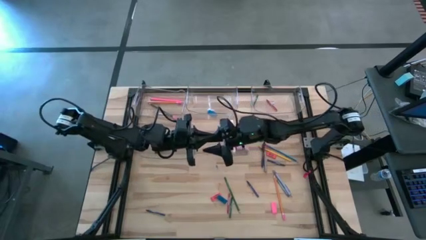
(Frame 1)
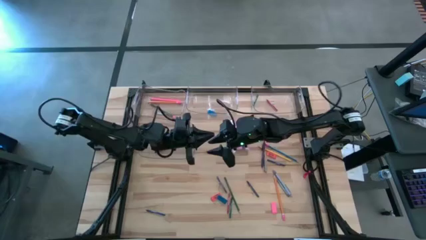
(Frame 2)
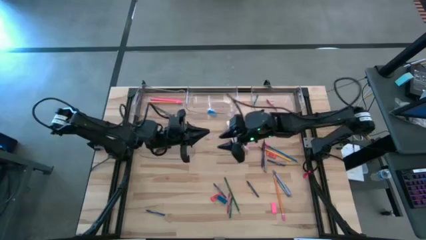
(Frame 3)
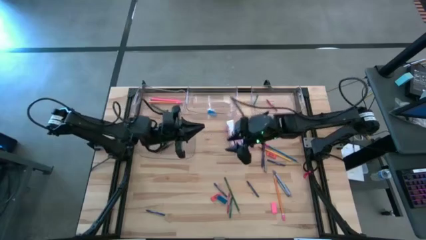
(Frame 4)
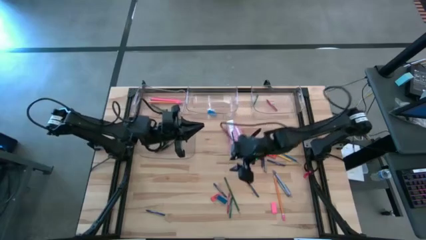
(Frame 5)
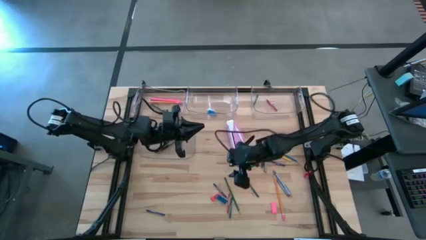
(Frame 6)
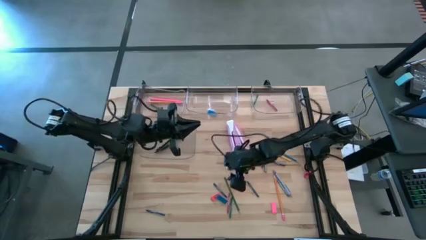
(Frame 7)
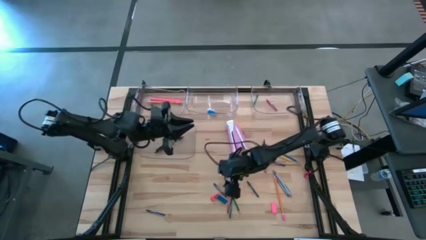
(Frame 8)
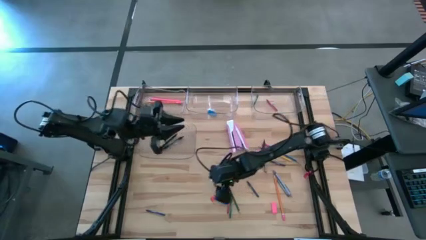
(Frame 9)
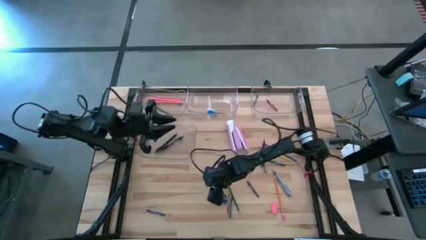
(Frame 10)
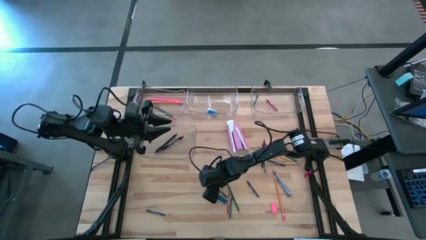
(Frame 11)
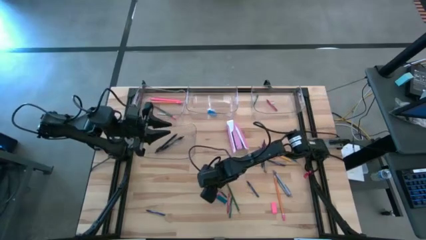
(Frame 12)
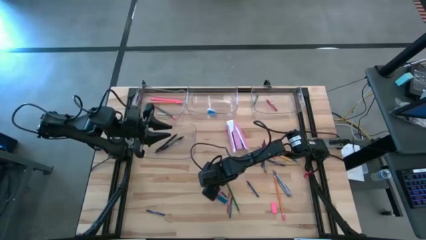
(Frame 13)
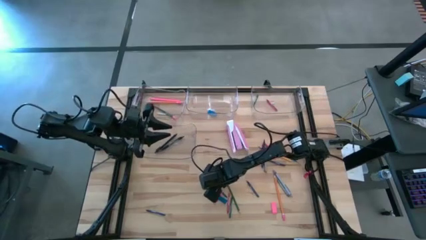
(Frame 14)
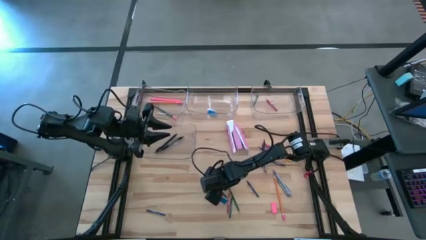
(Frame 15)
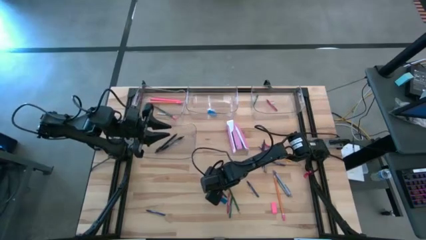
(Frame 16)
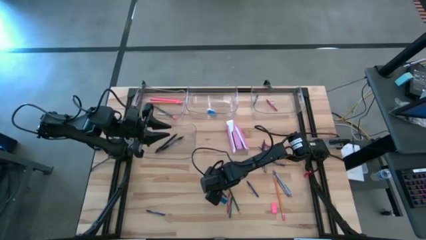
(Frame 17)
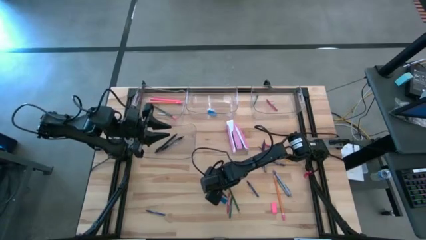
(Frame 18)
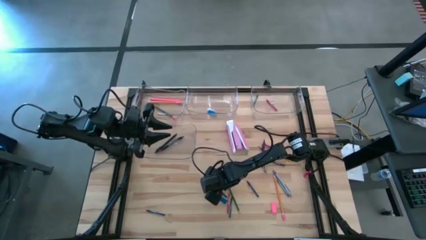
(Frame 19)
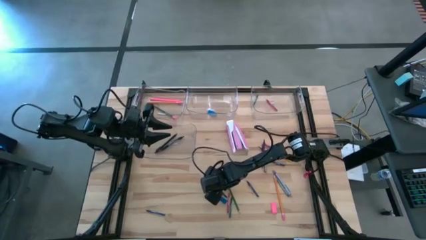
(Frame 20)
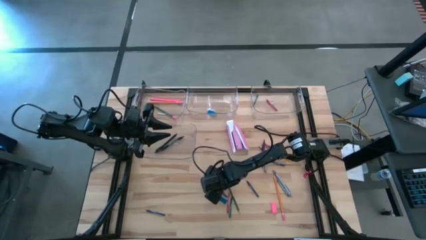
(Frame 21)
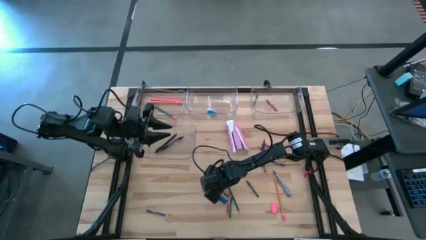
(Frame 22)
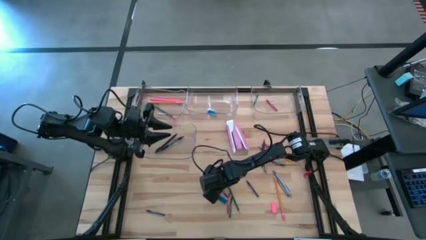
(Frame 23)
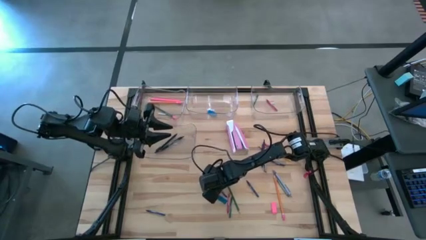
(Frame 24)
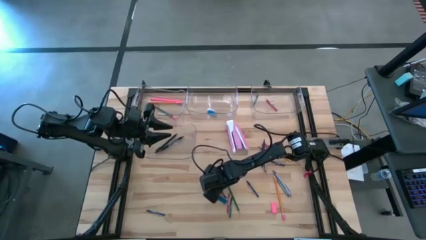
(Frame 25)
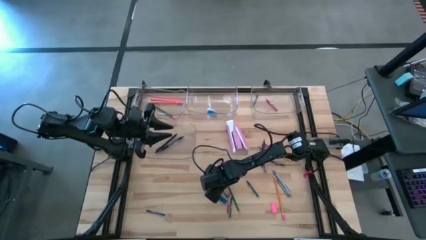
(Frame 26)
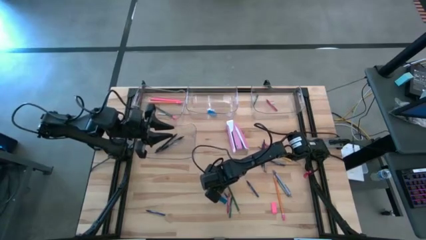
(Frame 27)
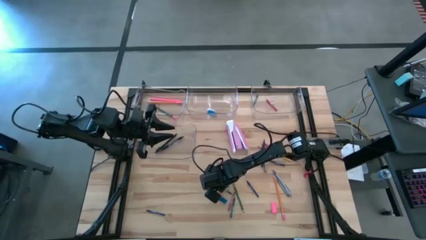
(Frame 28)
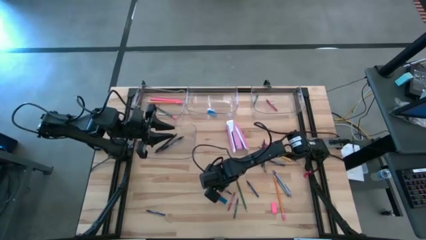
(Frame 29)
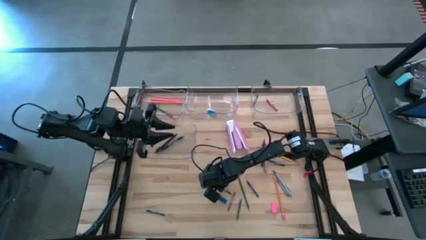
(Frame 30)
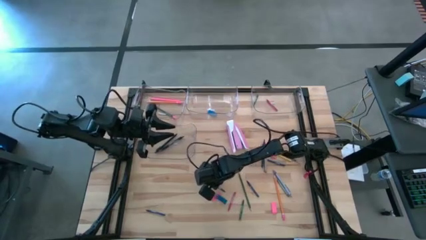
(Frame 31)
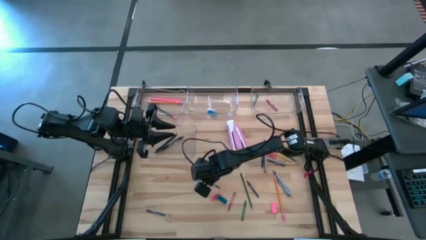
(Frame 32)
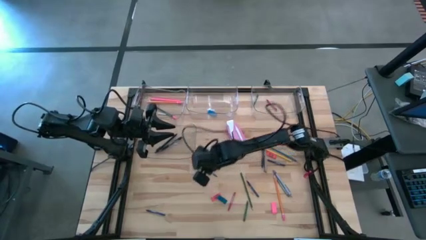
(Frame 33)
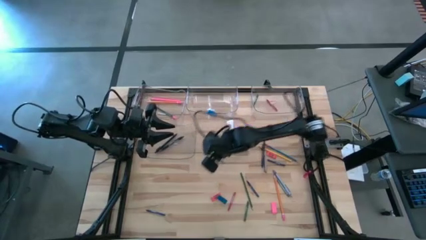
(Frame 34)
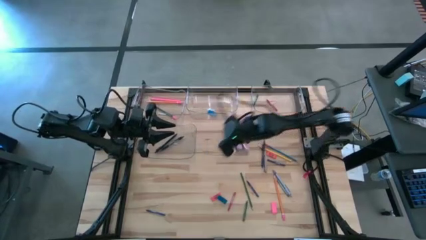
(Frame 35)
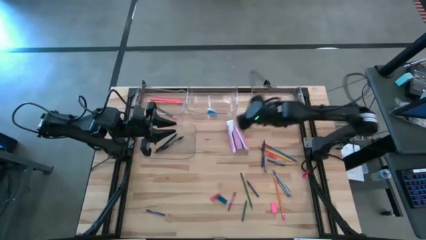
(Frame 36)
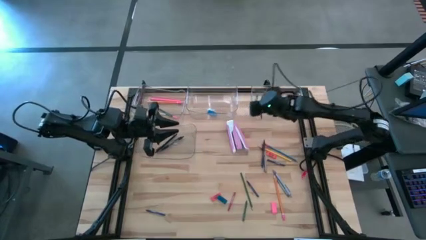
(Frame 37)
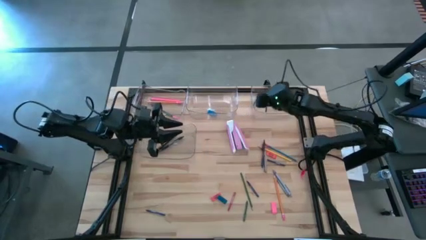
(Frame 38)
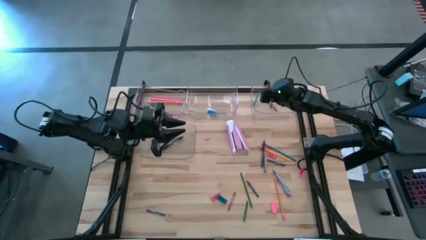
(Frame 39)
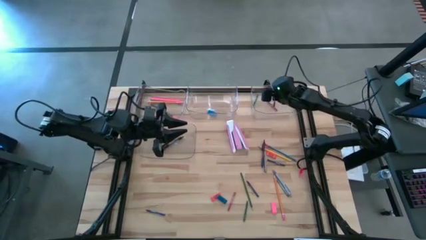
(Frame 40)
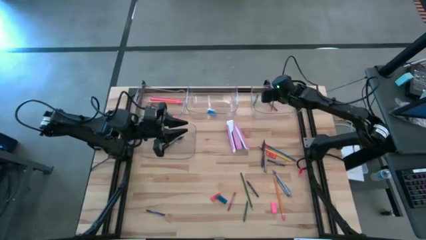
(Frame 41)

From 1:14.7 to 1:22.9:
Task: Sort crayons/erasers/pens/pencils in bins
Put the blue crayon into the top right transparent bin

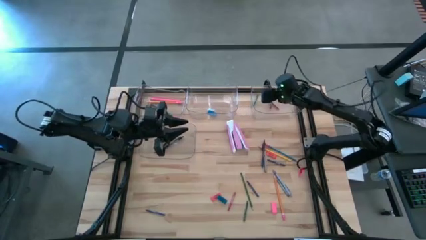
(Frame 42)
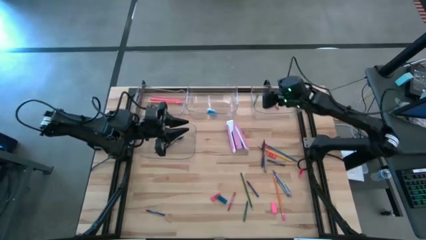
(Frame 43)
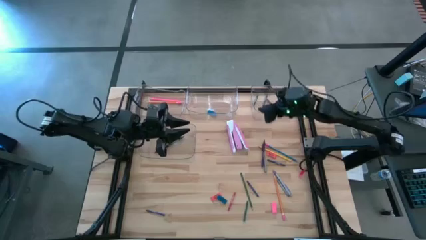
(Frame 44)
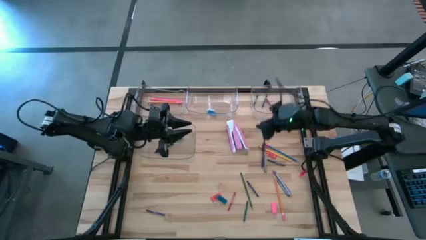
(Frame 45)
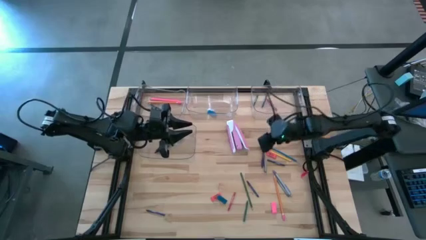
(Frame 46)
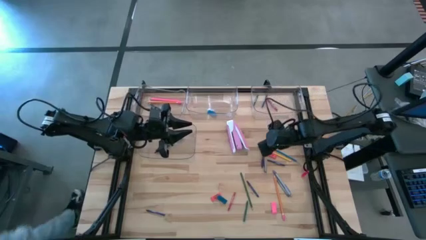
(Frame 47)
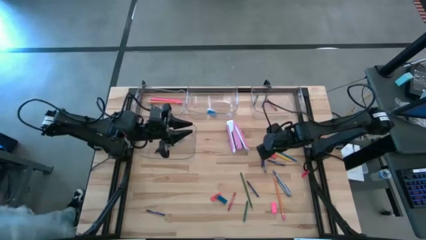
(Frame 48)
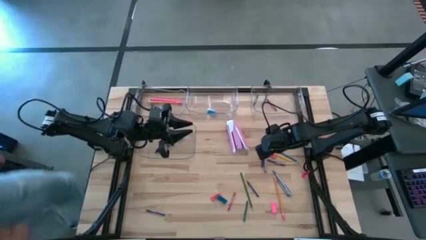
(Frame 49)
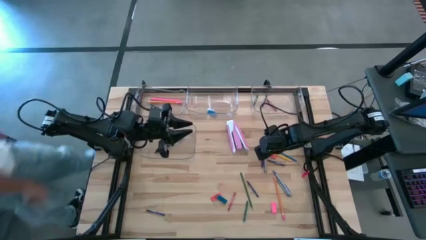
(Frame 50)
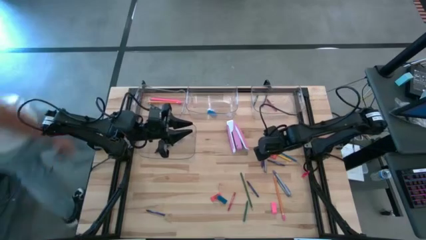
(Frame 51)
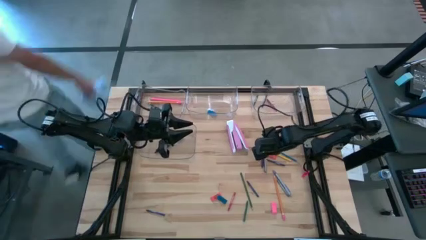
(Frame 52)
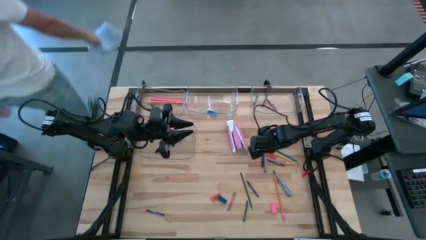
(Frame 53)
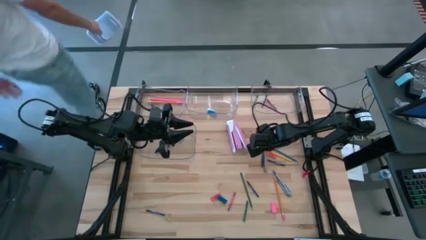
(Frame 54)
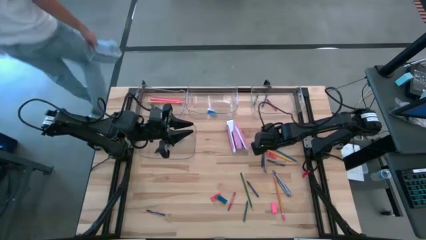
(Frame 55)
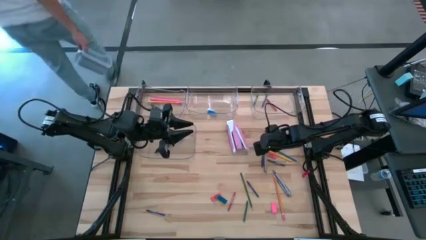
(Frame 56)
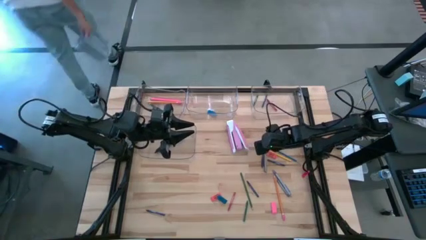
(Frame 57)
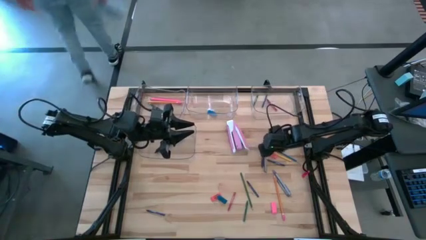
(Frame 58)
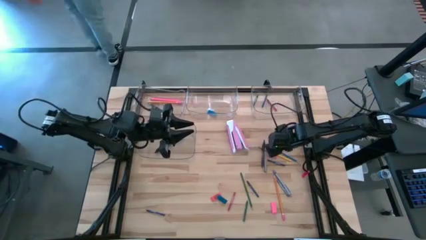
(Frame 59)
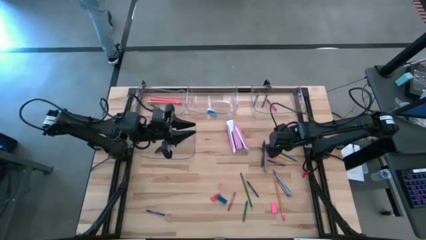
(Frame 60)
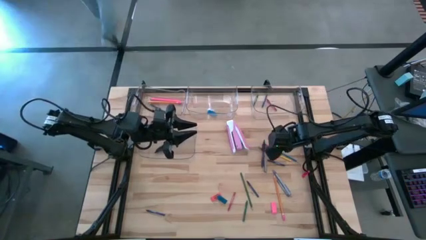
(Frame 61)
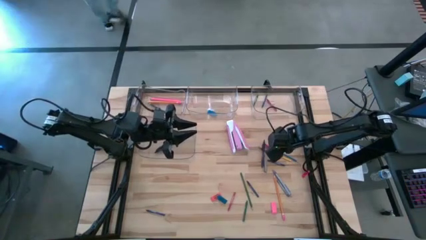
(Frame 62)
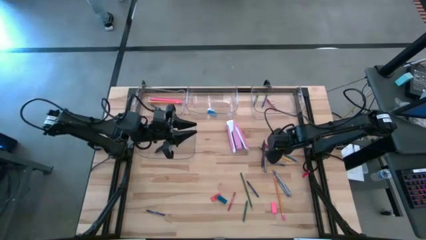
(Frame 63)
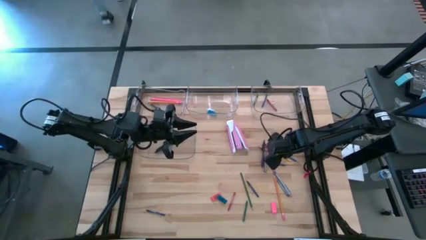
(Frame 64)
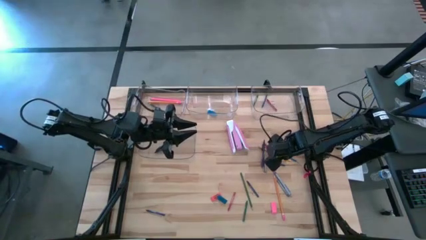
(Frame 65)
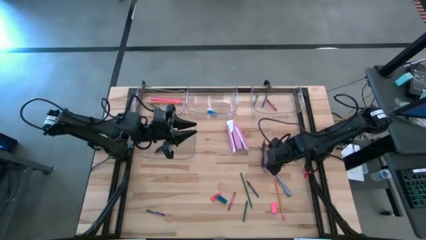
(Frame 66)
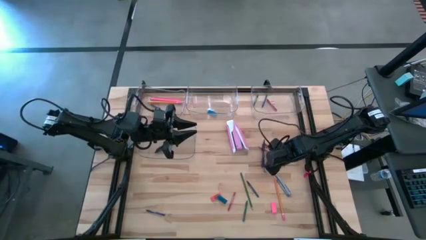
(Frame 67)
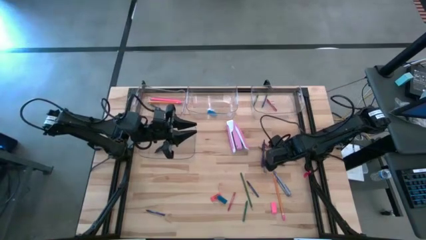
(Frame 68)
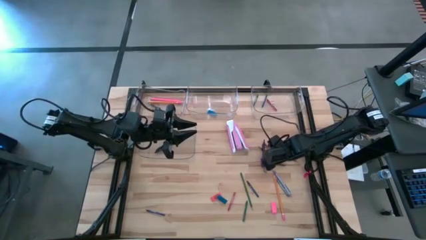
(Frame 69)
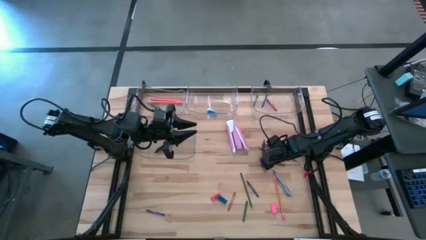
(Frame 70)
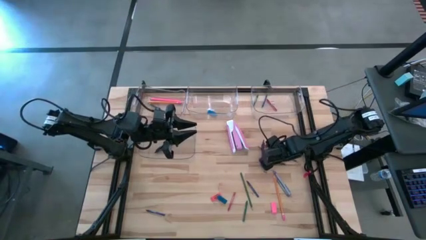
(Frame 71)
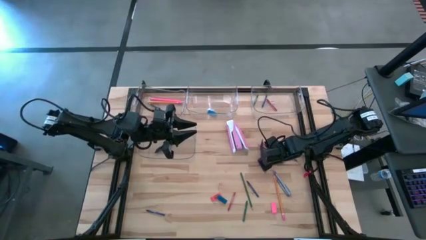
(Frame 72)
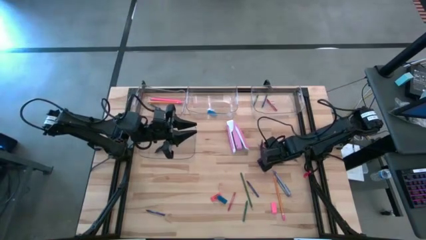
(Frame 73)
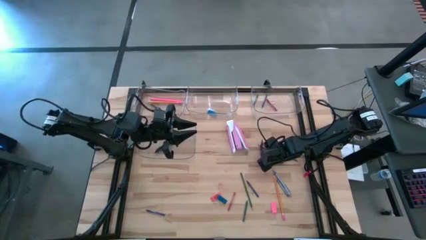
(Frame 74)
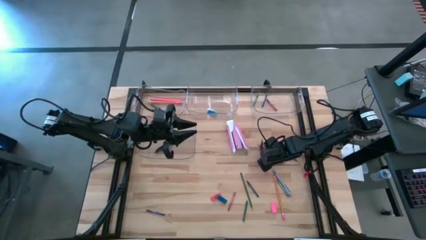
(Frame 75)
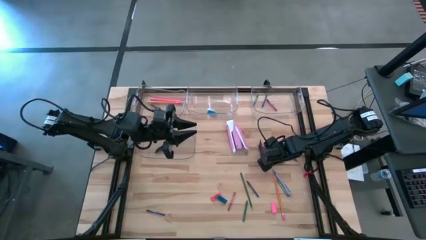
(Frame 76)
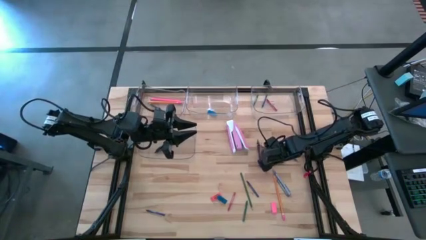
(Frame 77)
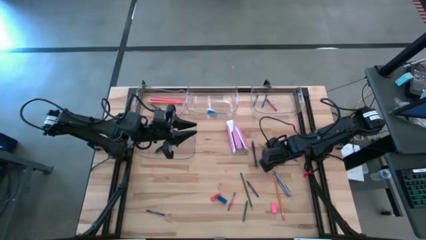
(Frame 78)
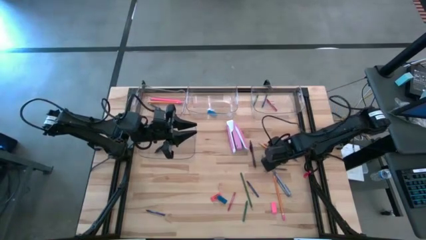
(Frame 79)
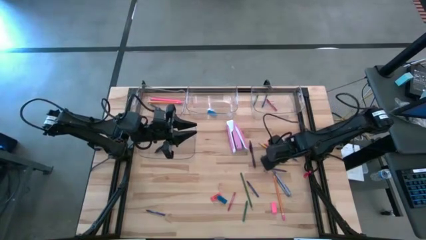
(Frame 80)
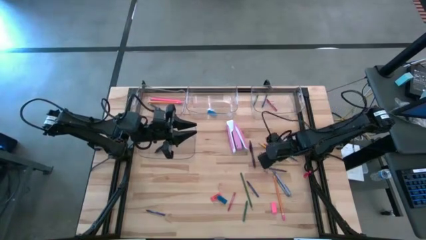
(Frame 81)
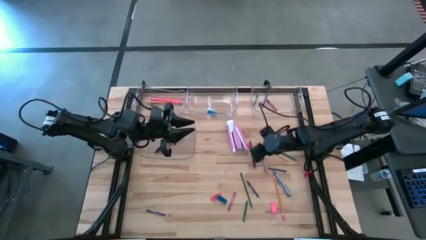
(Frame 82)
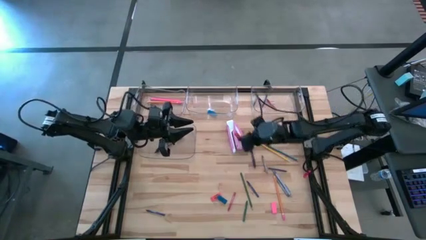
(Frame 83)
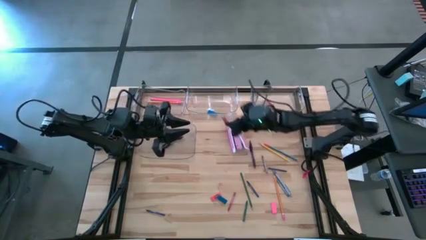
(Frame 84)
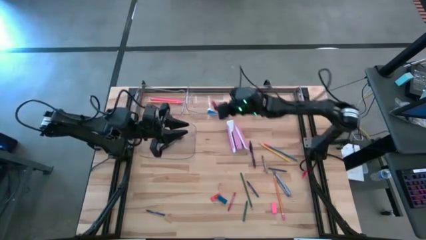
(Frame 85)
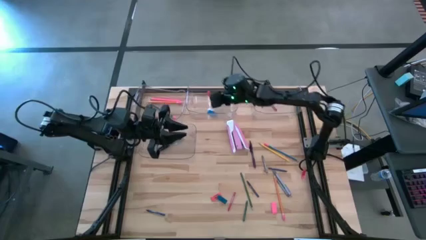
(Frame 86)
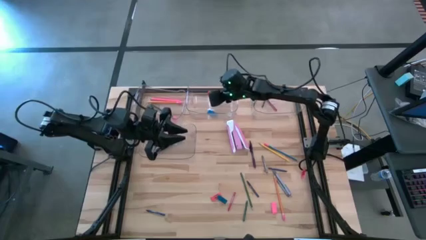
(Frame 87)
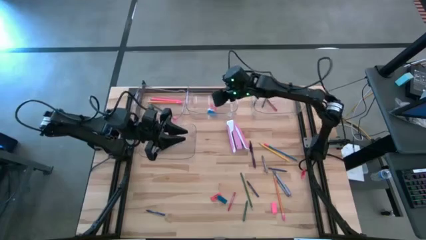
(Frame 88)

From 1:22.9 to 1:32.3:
Put the orange eraser into the middle transparent bin
